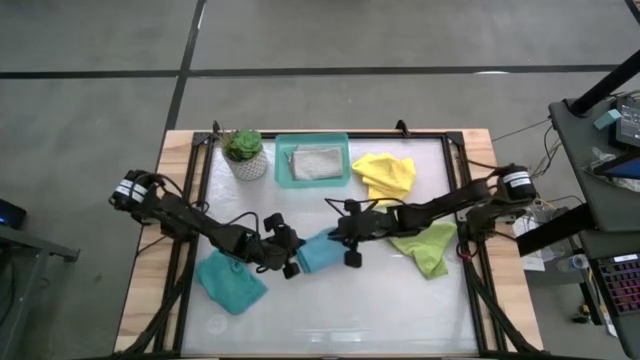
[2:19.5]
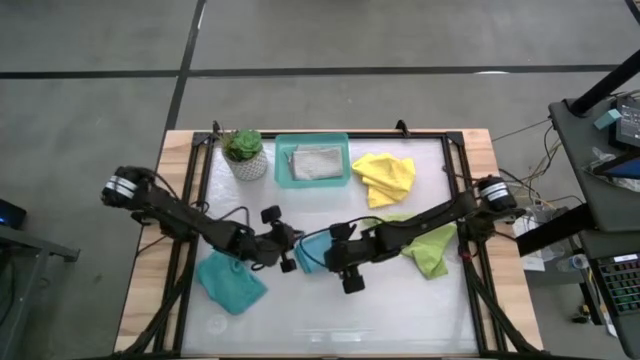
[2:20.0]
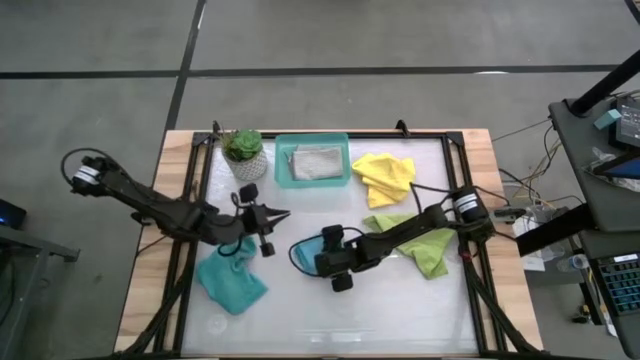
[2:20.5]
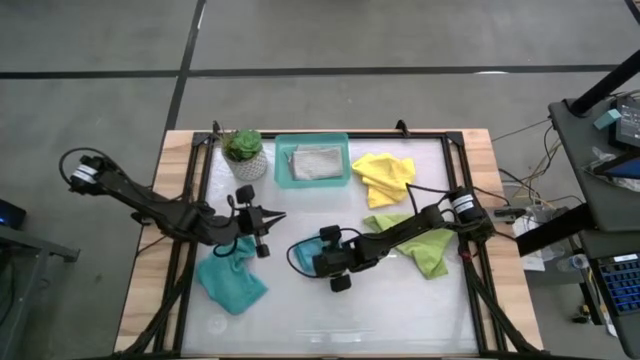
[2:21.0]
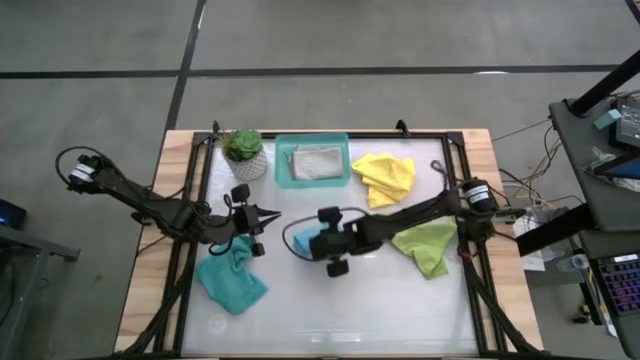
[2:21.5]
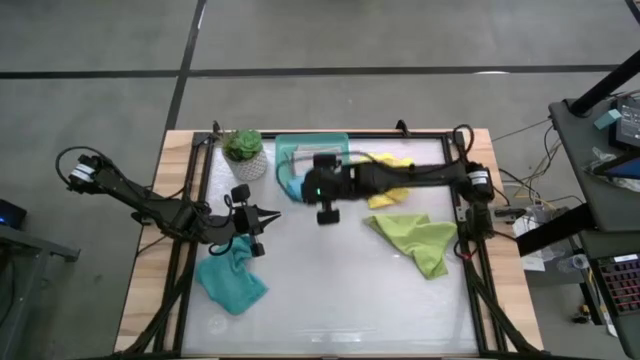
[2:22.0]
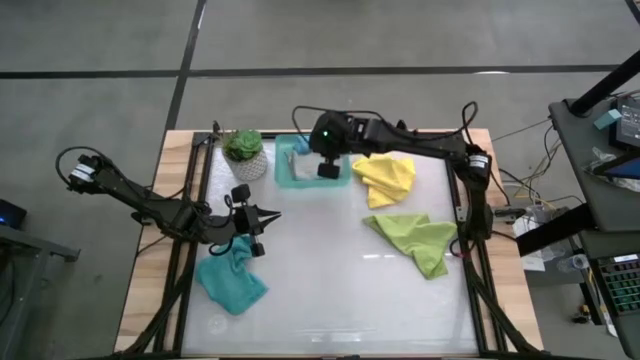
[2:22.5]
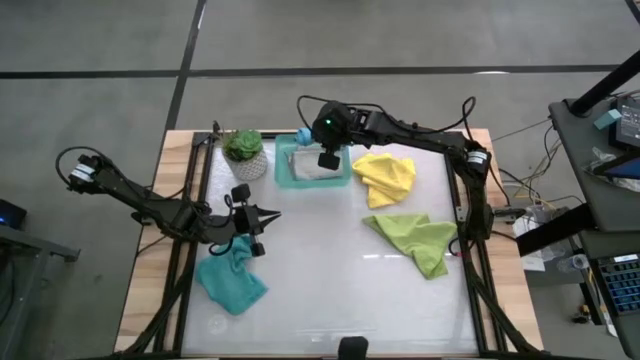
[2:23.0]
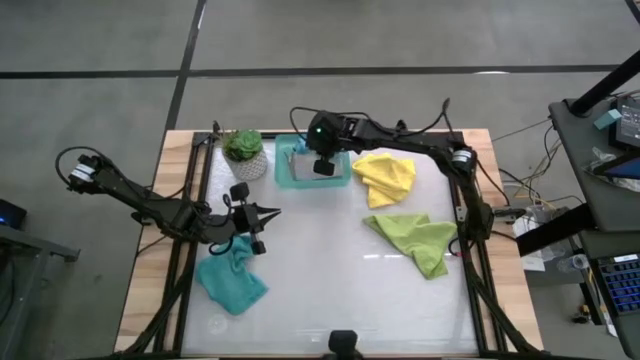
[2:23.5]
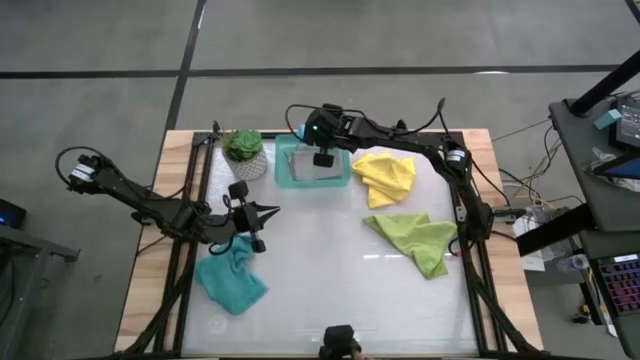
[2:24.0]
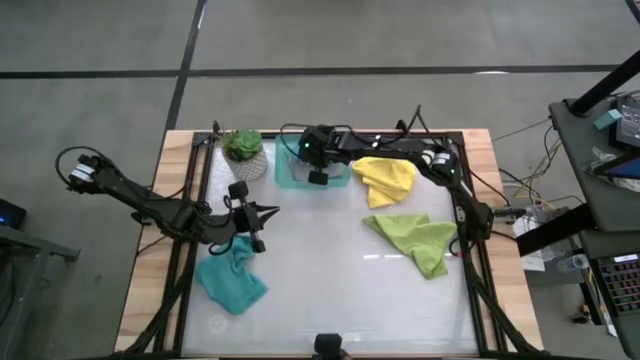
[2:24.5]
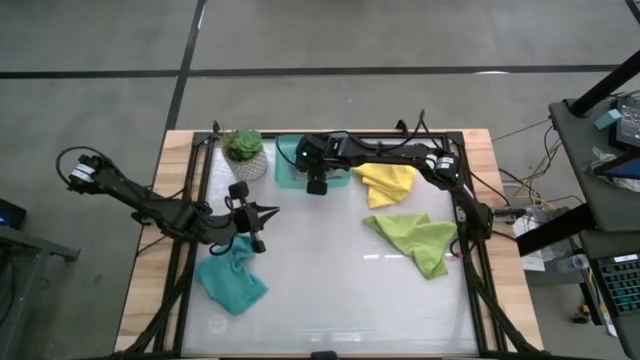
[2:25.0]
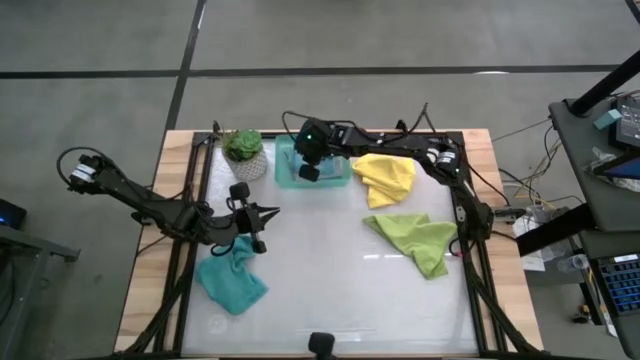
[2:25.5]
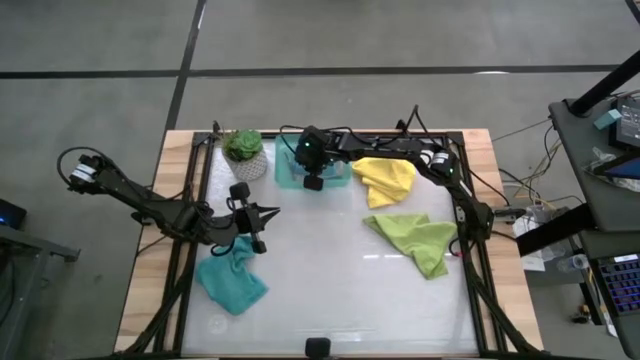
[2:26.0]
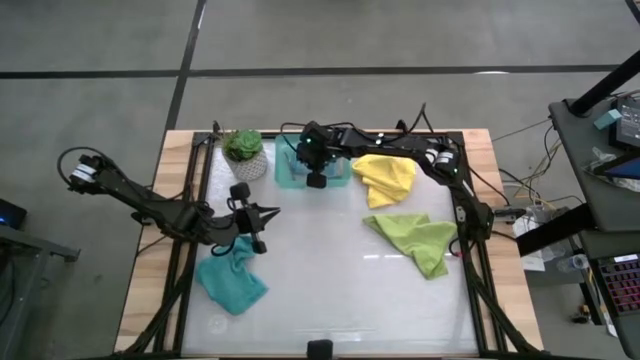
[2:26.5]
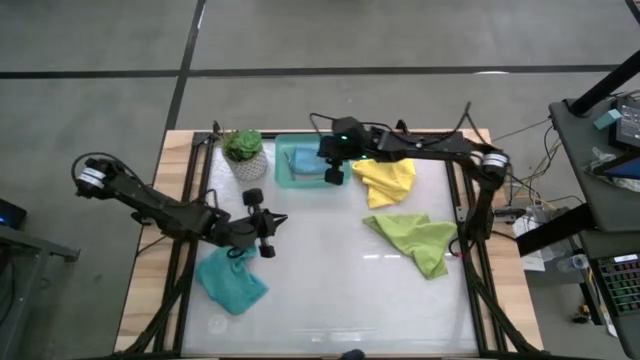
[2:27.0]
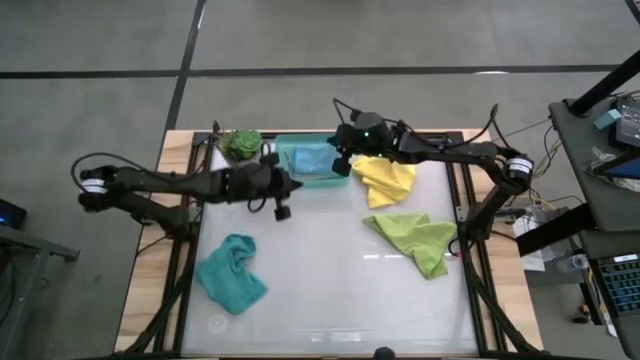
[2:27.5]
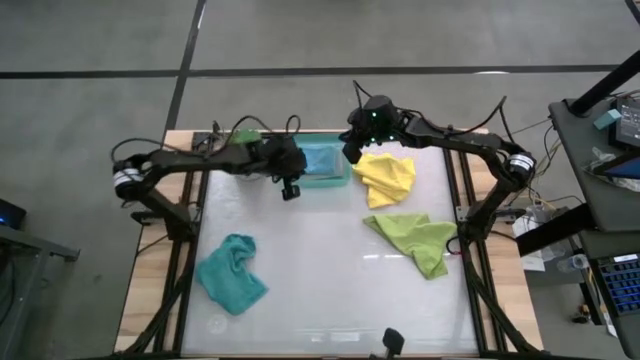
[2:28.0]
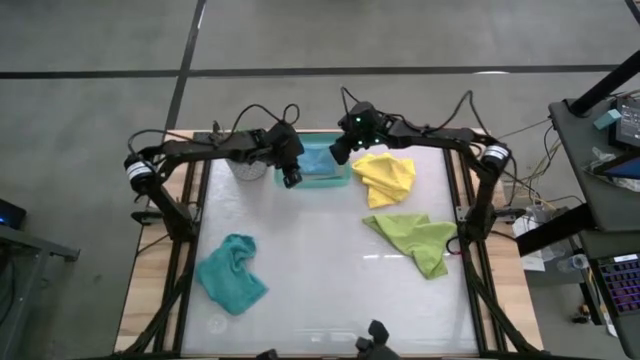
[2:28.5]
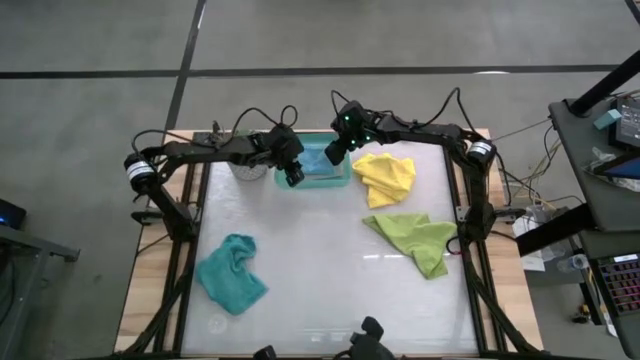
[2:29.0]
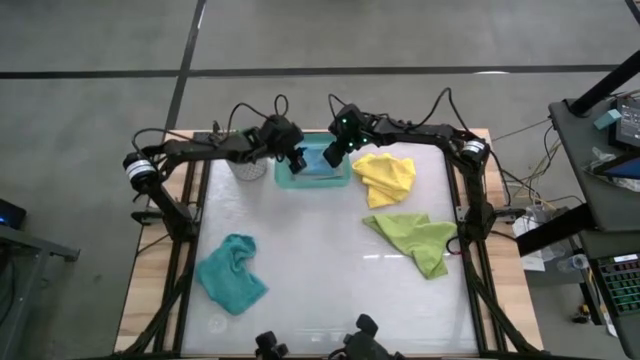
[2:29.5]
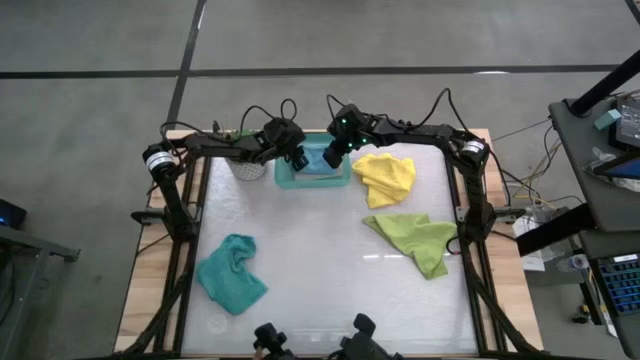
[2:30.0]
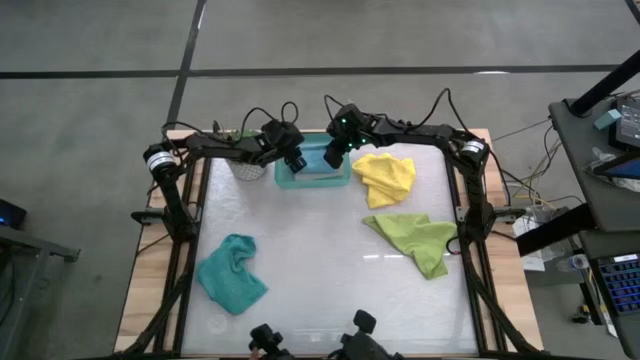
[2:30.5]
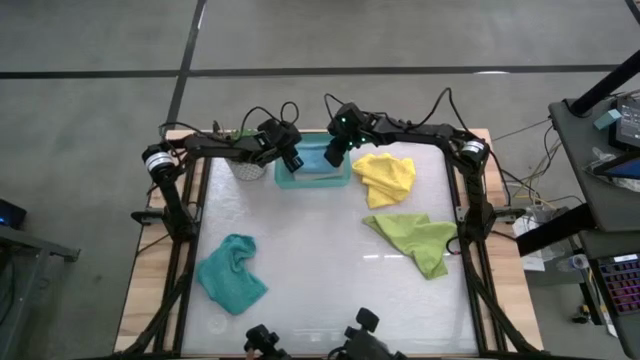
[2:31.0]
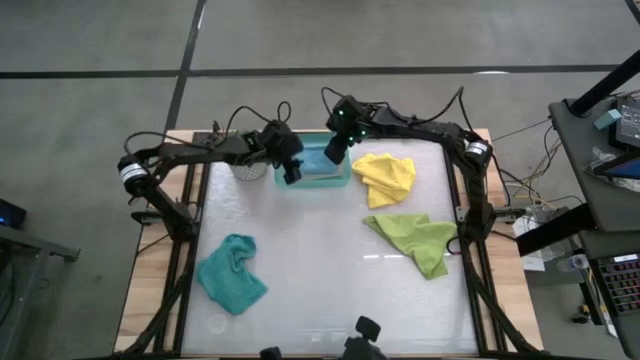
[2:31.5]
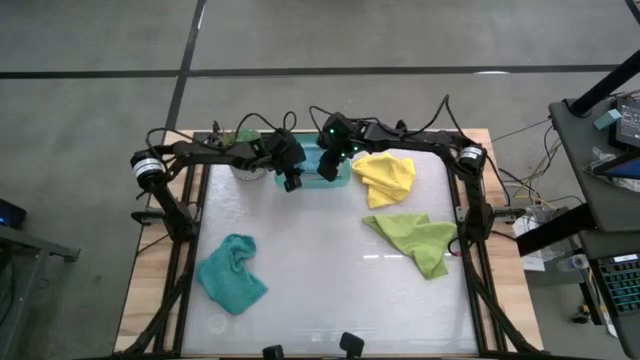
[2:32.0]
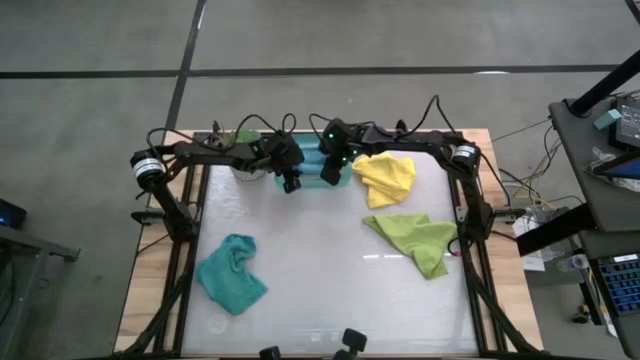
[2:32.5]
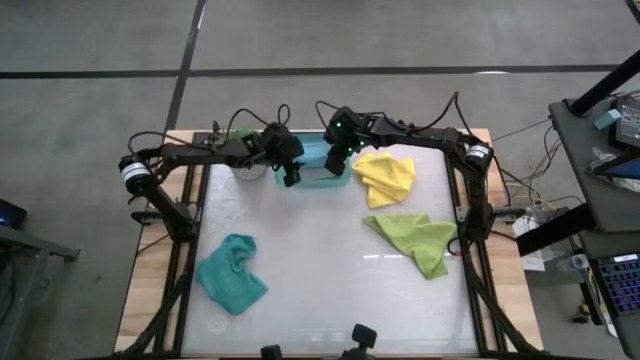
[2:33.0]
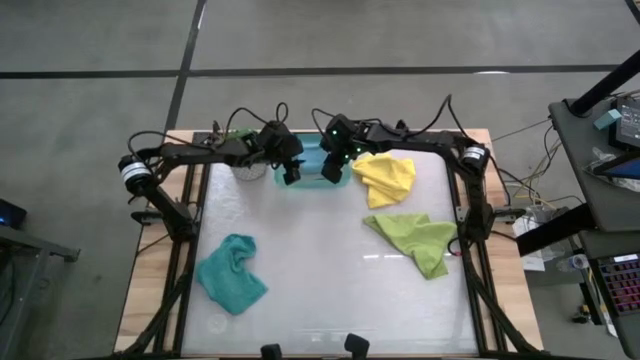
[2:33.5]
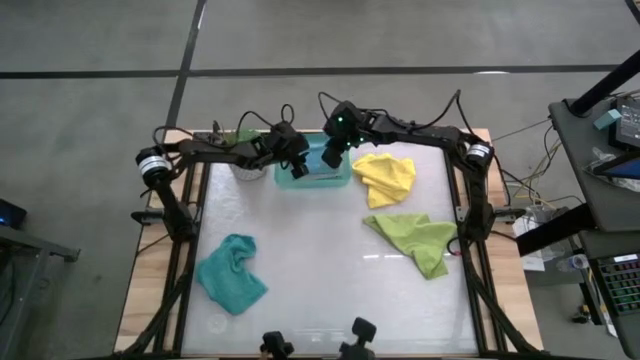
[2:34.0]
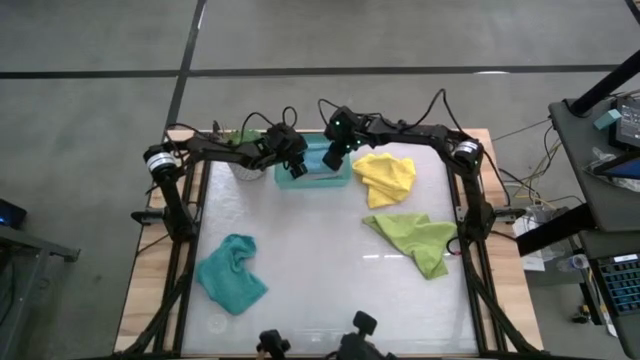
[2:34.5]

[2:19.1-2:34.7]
Task: Fold microfiber towels
Put the blue microfiber cloth into the green bin

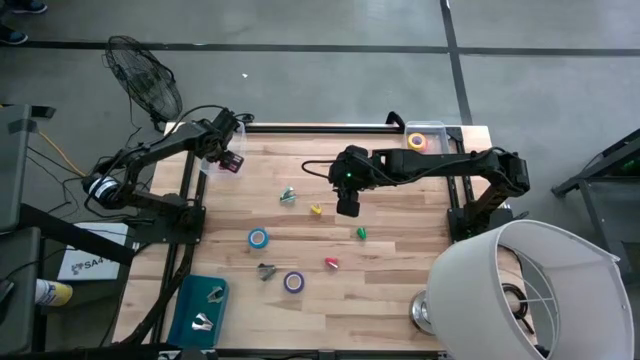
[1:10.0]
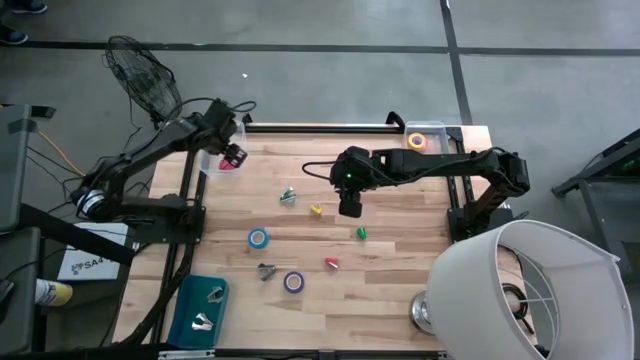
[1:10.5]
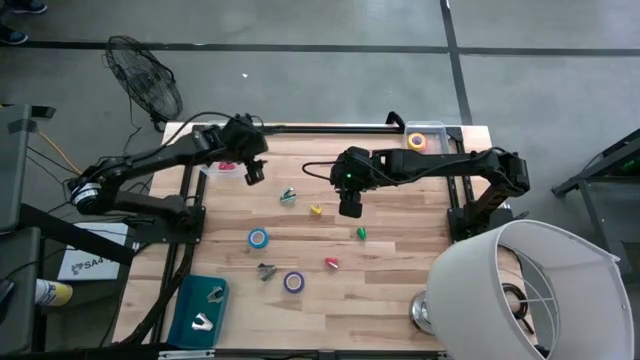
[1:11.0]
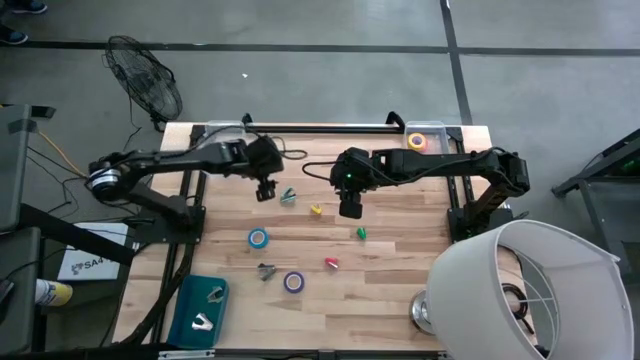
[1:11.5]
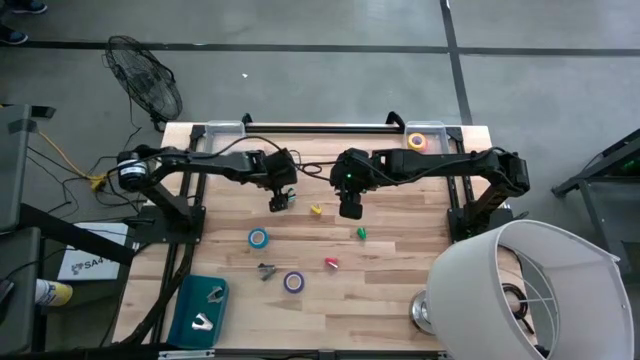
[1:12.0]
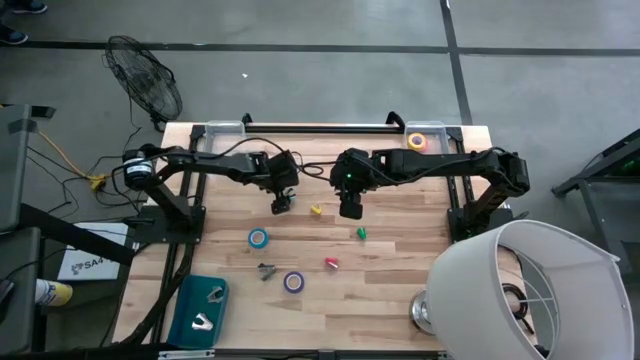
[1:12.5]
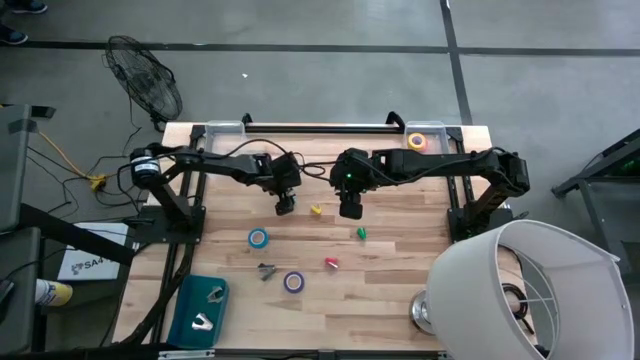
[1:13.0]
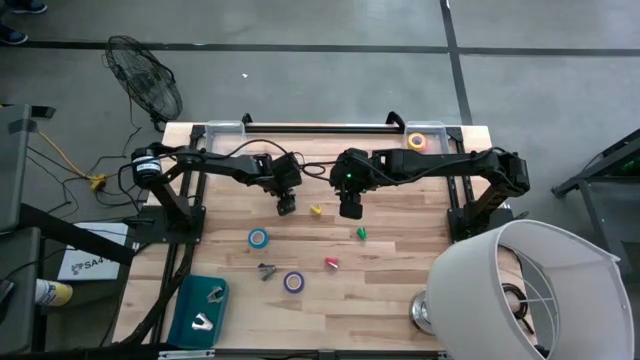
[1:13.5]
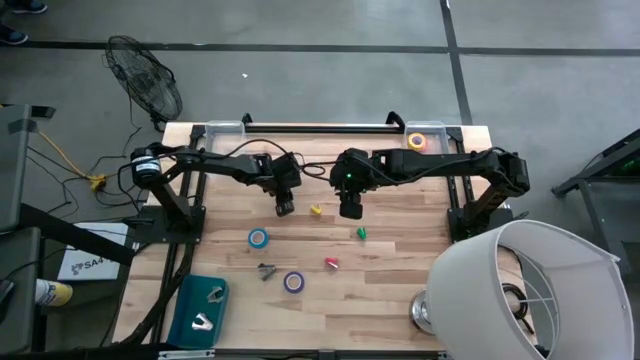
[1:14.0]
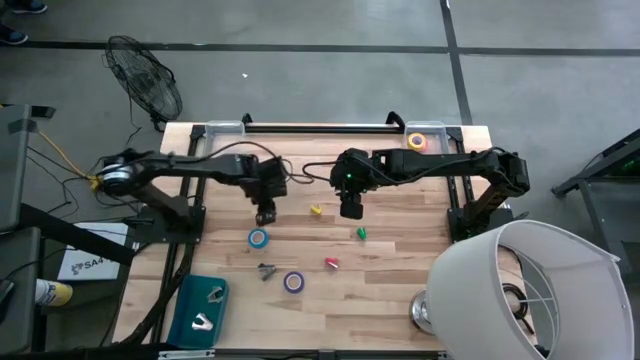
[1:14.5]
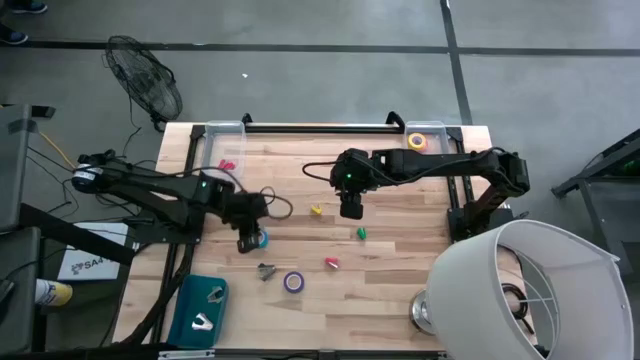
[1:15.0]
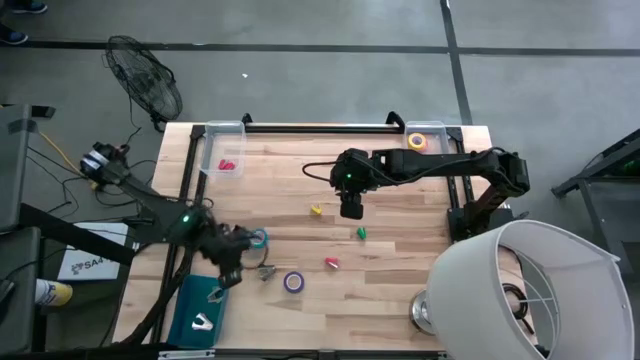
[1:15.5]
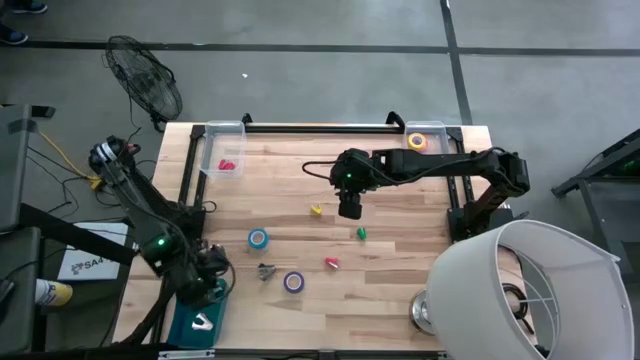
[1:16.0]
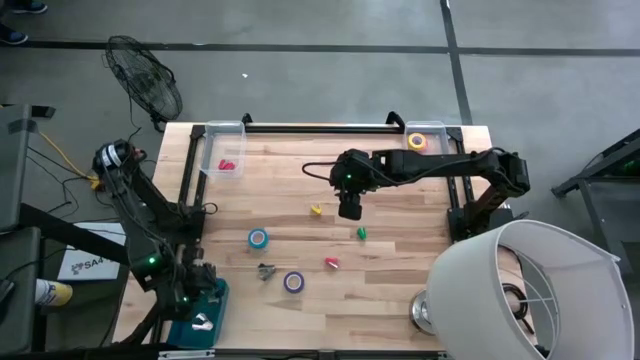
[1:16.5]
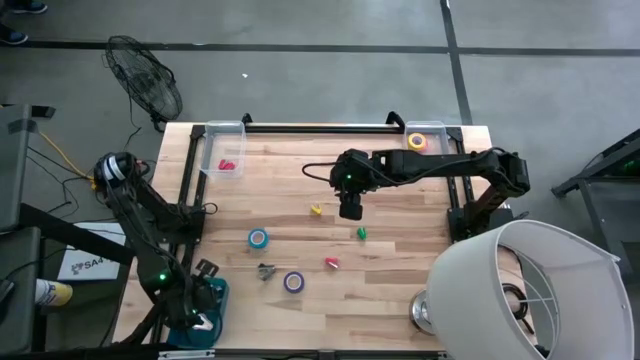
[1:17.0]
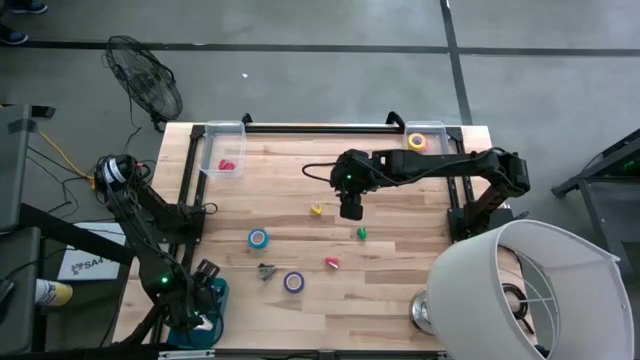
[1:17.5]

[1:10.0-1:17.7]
Task: Pick and place Stapler, Stapler remover, tape
Put the light blue staple remover into the blue bin
